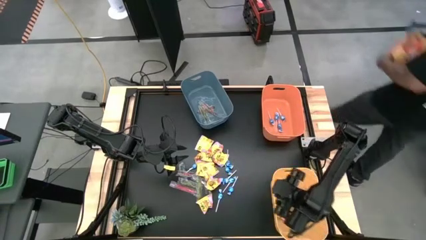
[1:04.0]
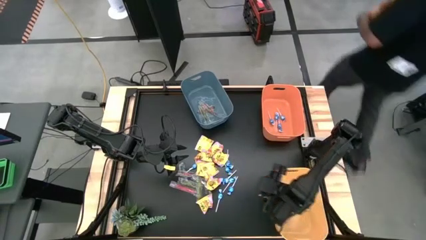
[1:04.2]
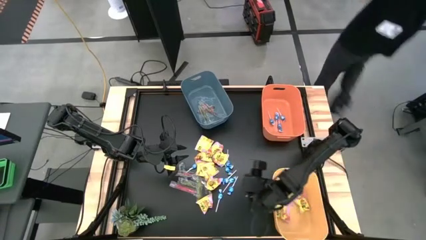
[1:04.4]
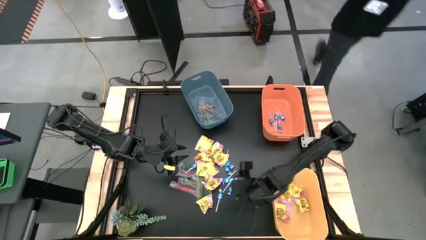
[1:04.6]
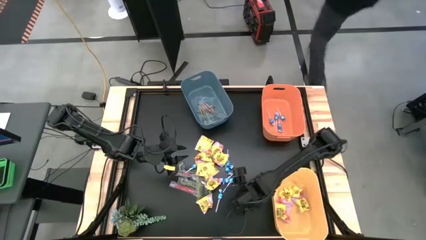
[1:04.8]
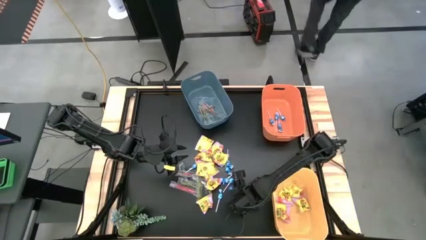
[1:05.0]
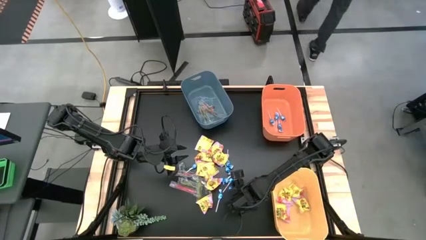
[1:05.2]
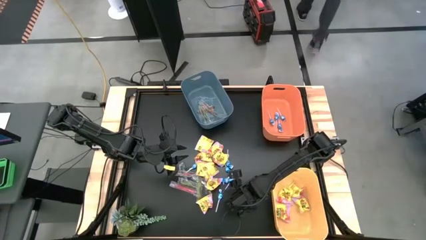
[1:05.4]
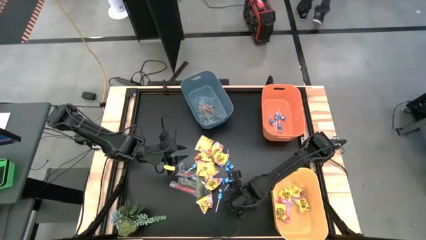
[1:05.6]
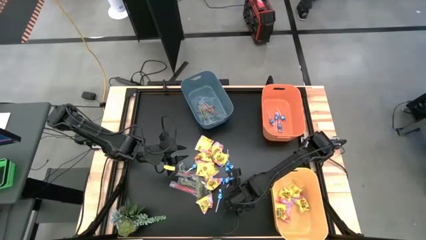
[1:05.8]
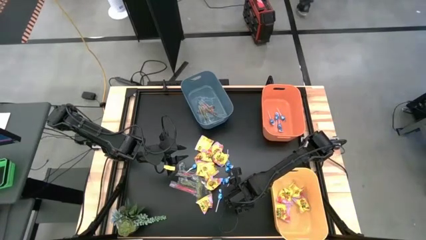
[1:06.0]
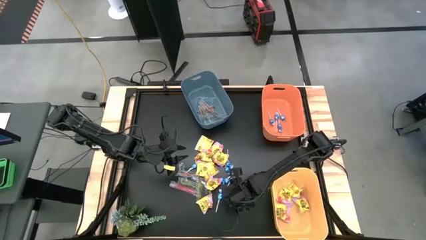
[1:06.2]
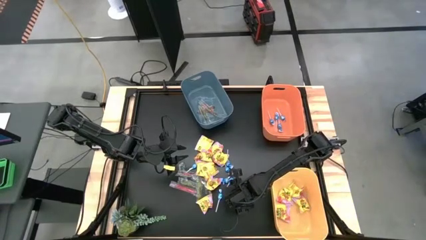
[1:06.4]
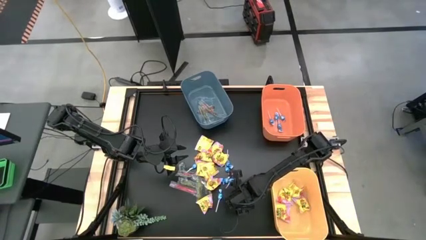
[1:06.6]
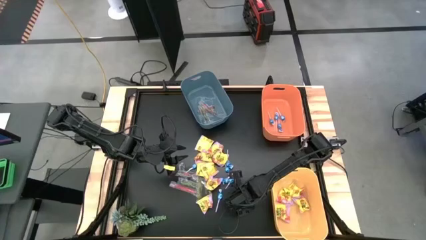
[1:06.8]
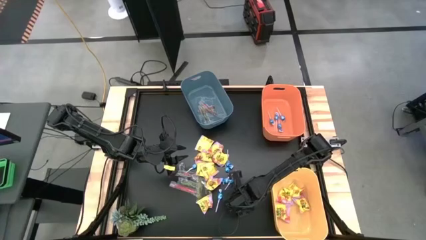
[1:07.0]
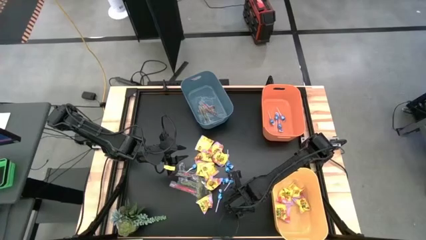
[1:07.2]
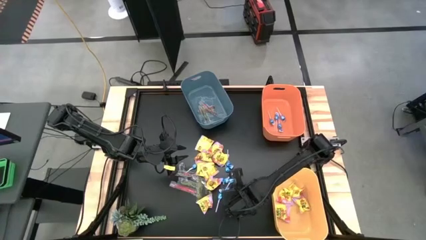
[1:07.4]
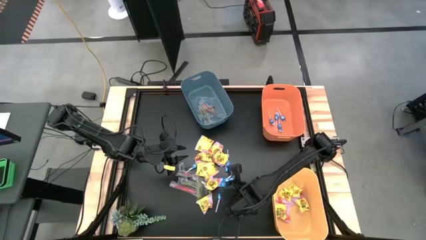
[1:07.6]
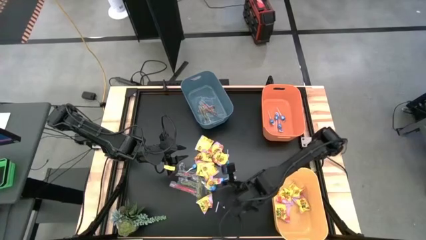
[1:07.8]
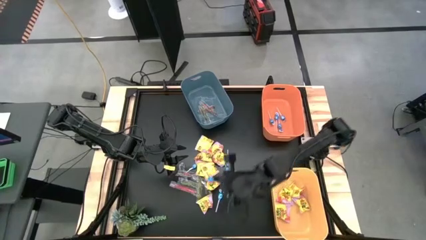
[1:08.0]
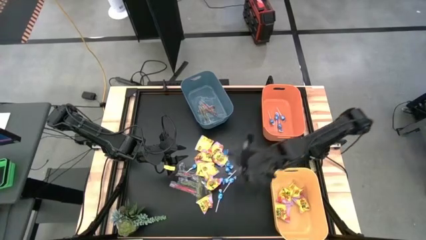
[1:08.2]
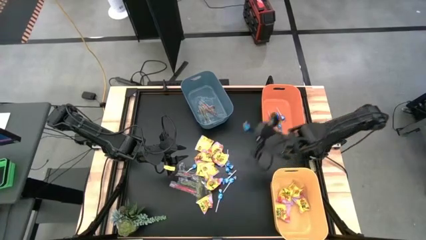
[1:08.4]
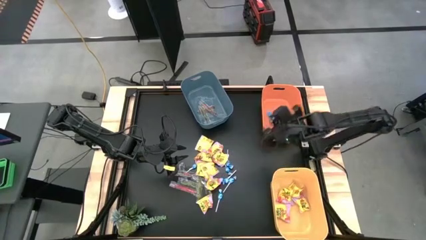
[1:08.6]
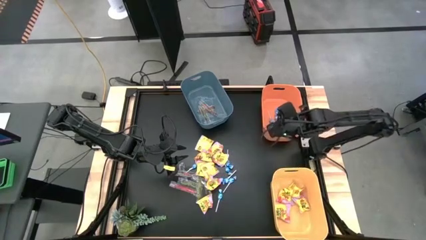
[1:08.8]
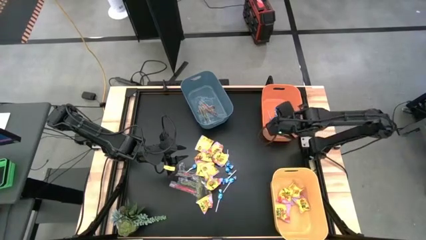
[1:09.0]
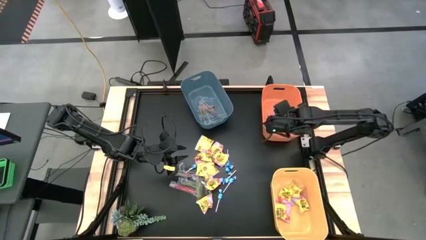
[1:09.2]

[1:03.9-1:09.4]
Task: Sort candy
Put the blue candy into the orange bin

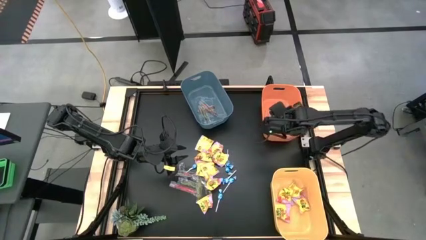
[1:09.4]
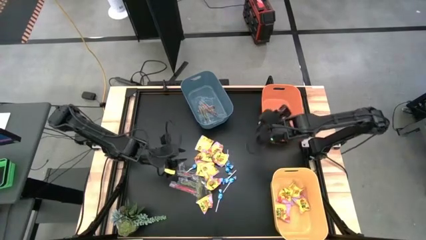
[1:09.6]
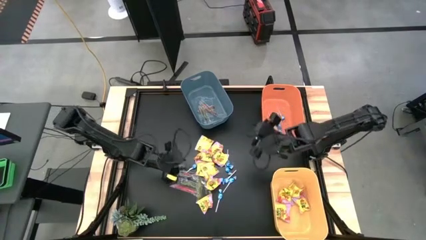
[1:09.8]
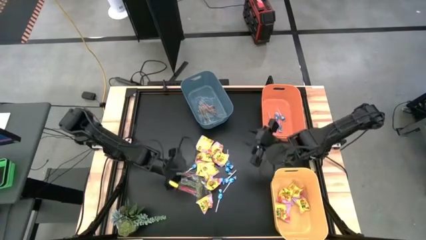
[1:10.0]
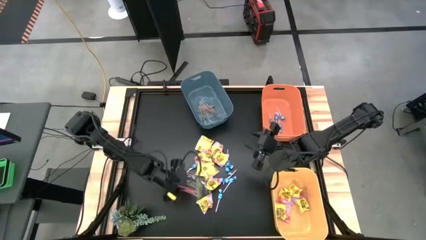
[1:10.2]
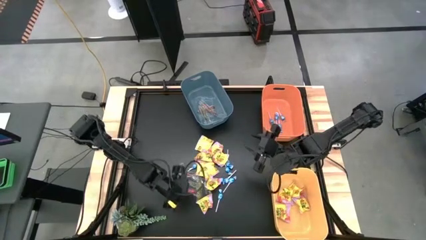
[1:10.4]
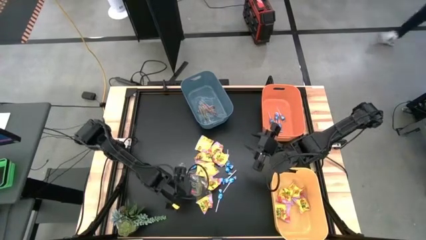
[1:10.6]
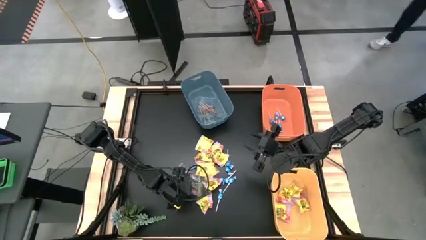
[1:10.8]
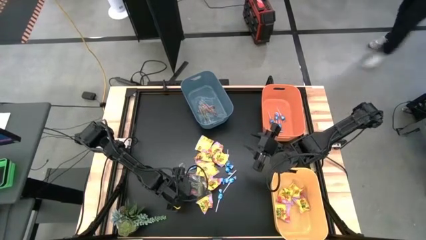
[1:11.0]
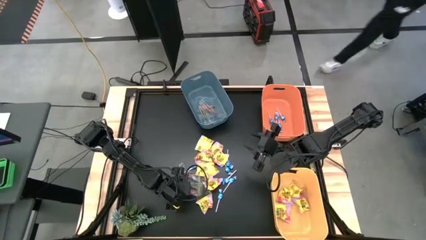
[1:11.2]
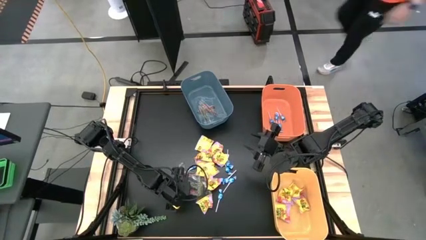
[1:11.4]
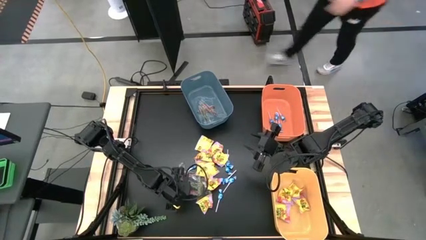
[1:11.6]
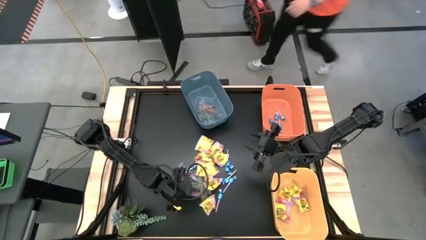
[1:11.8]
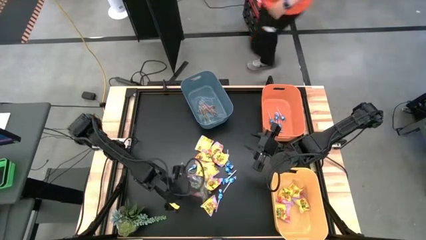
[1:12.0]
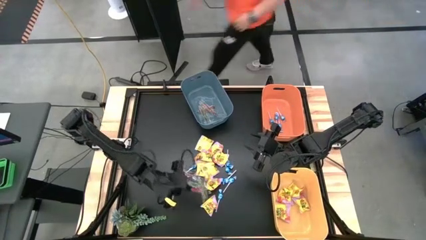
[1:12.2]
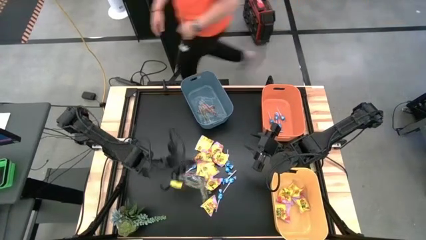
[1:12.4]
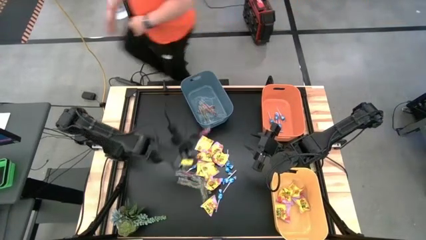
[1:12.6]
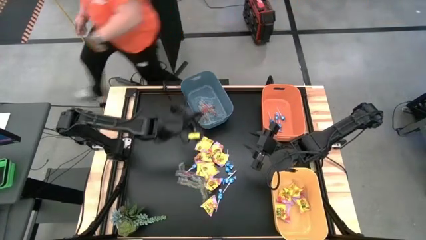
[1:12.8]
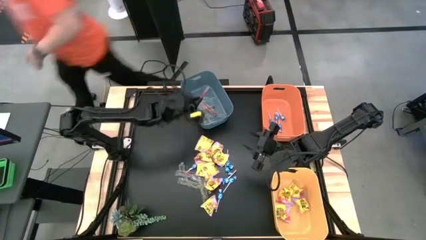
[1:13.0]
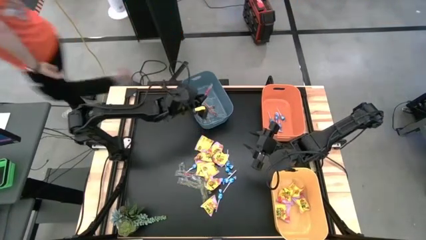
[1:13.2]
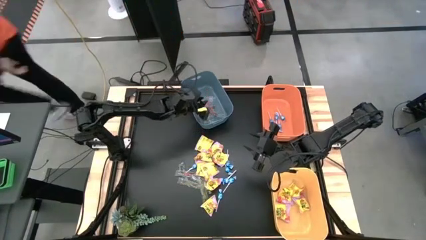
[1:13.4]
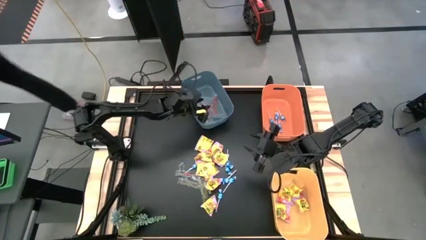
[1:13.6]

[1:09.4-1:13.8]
Put the transparent candy into the blue bin

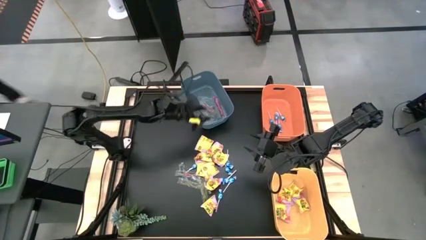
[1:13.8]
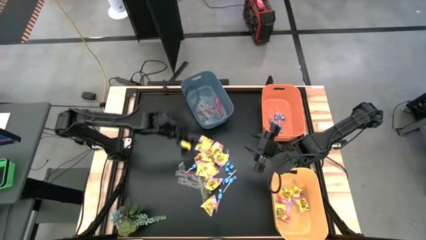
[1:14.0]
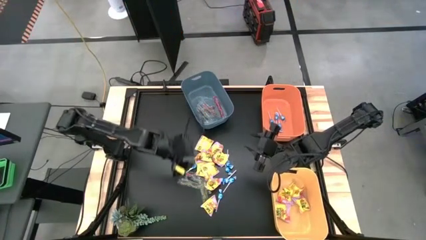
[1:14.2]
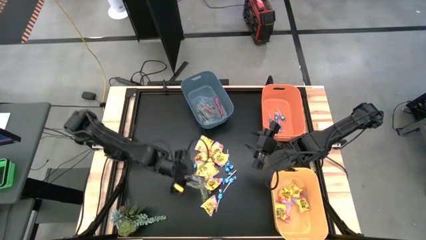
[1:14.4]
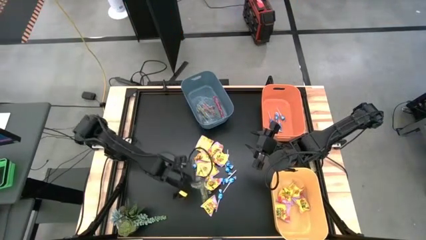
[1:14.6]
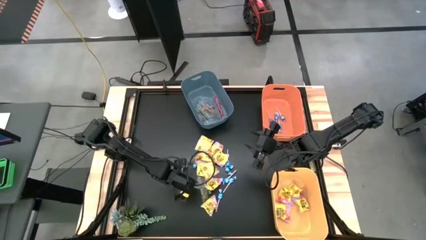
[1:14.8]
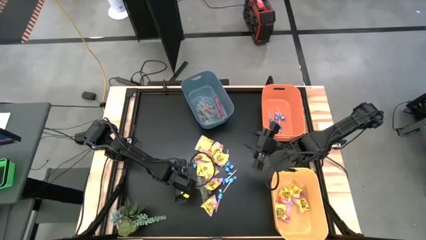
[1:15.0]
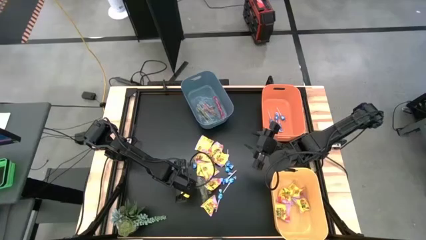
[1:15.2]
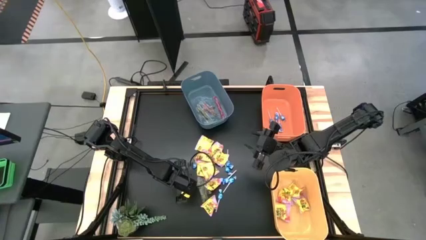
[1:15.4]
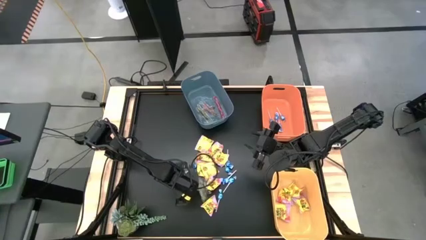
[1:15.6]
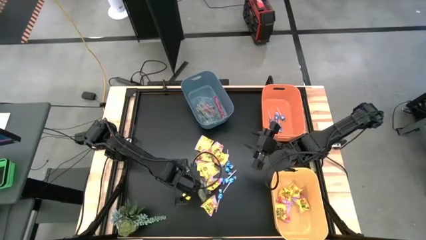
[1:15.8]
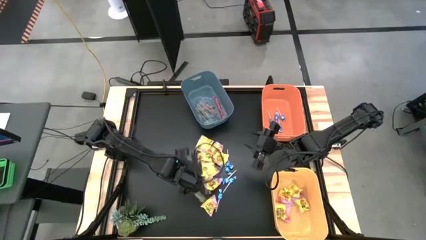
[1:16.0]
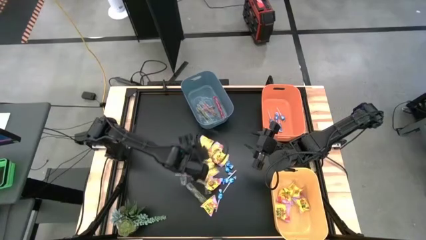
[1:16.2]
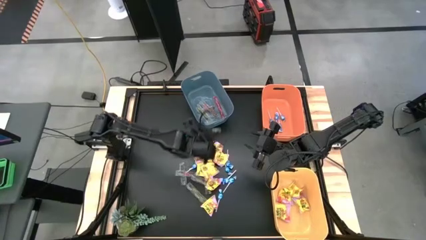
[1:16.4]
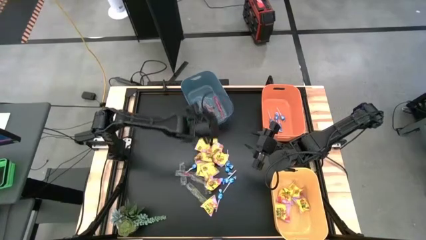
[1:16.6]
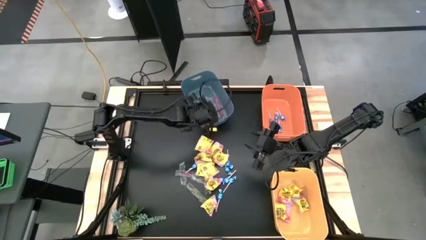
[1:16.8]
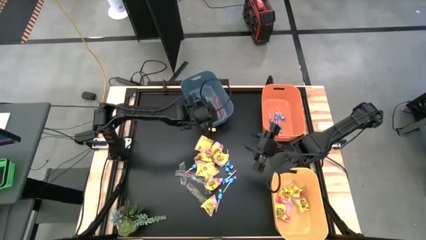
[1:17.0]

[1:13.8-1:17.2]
Put the transparent candy into the blue bin

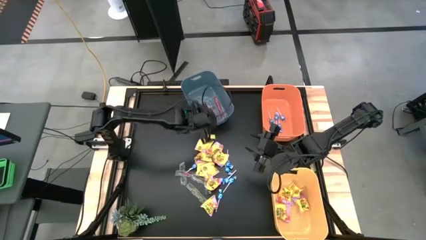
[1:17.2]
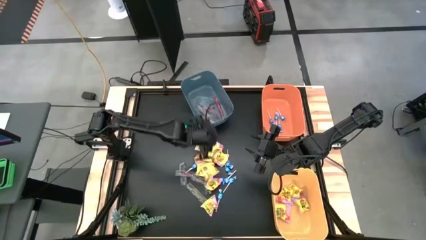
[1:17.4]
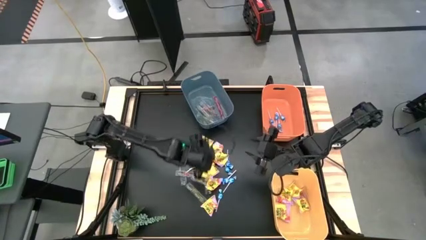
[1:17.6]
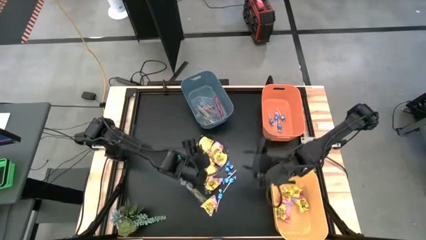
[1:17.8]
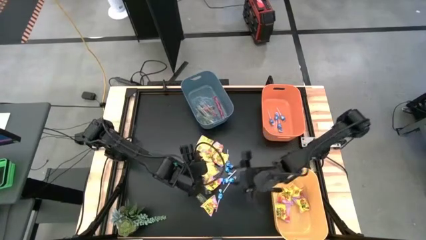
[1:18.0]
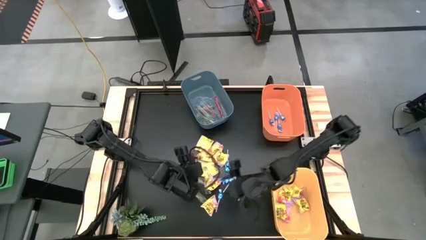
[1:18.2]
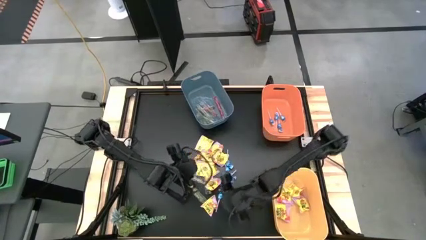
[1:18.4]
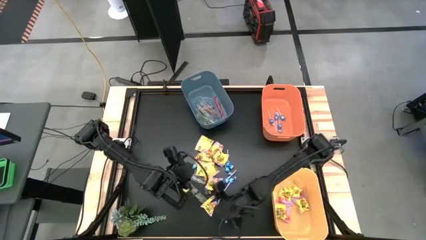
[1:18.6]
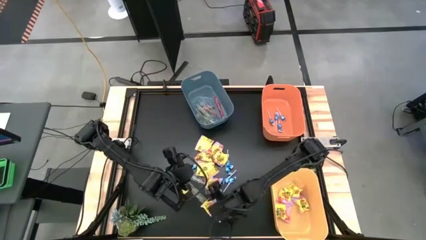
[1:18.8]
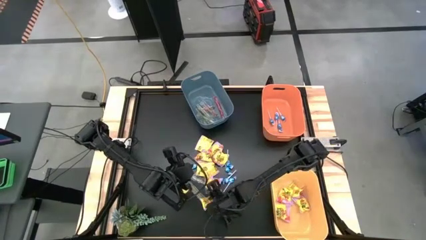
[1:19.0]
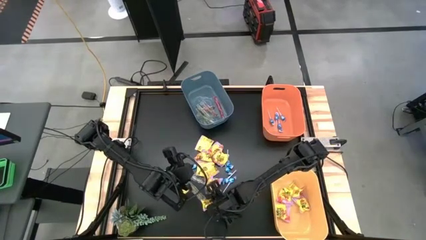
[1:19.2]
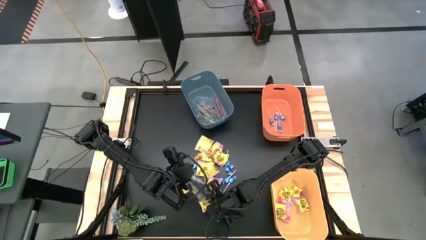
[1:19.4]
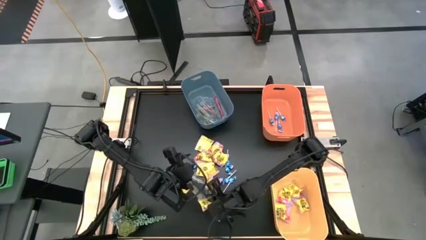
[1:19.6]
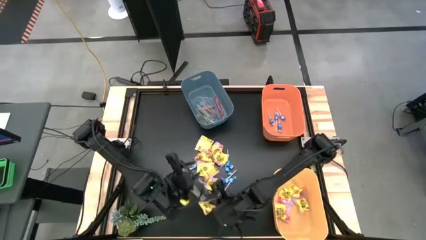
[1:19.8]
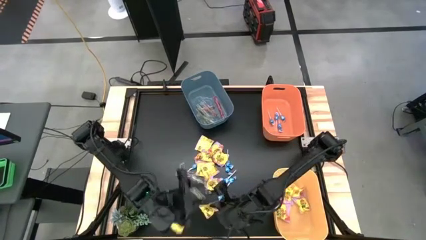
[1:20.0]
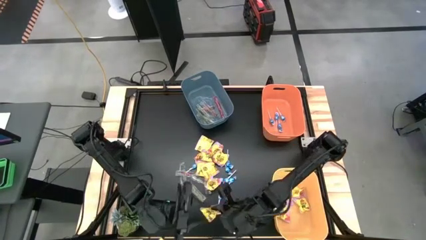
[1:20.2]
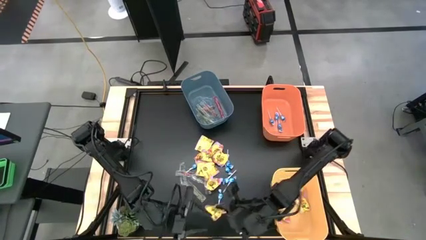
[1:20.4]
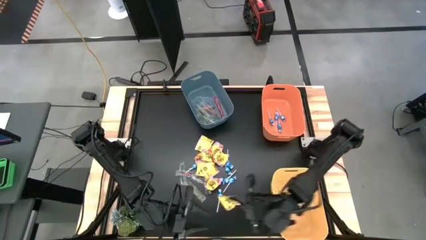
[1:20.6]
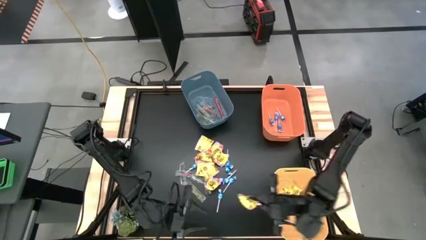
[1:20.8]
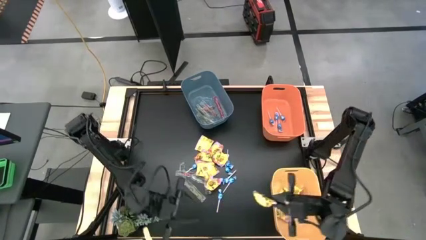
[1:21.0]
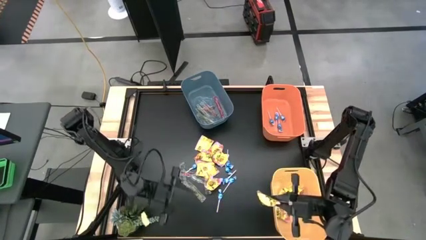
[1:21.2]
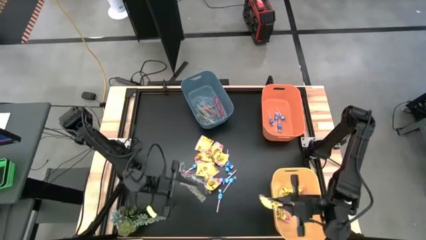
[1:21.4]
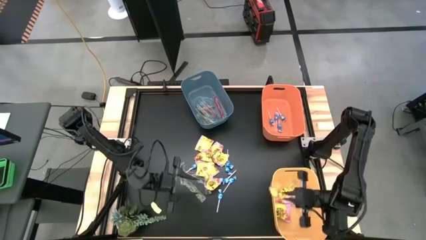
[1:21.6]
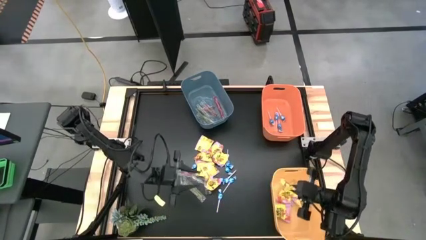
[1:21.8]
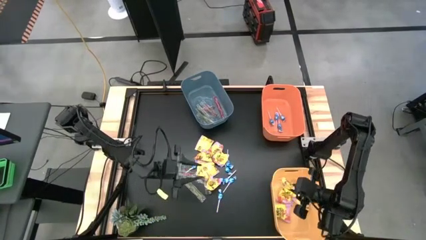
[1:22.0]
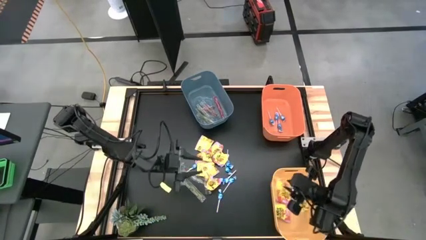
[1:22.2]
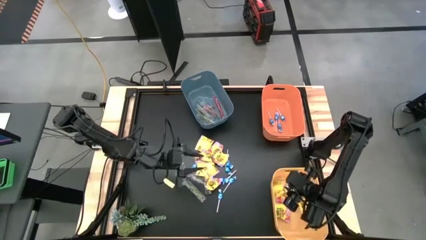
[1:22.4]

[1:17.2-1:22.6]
Put the yellow candy into the yellow bin
